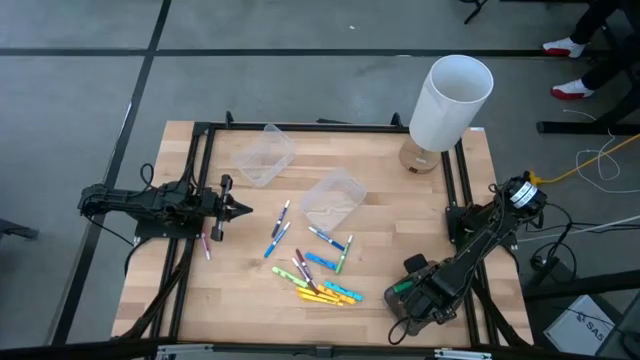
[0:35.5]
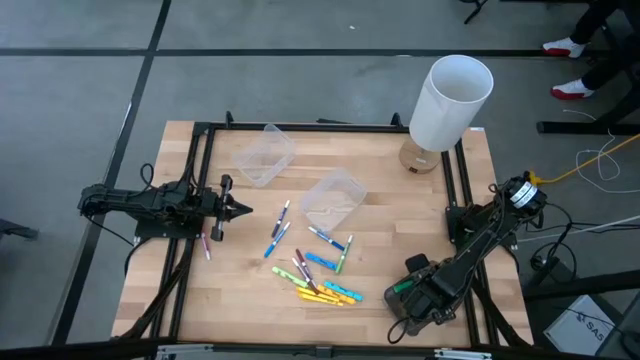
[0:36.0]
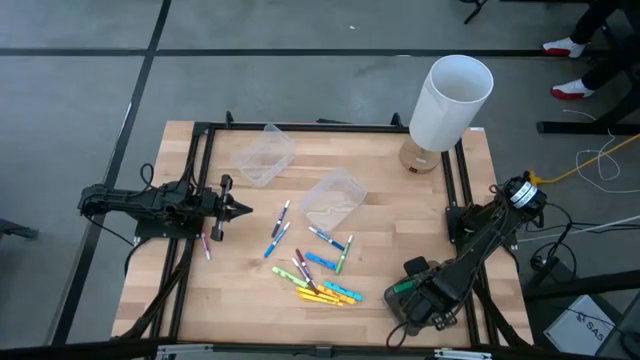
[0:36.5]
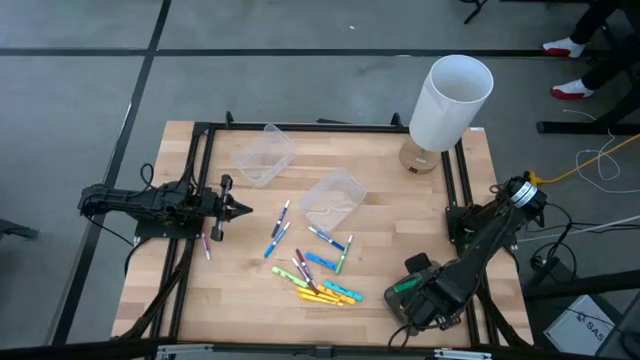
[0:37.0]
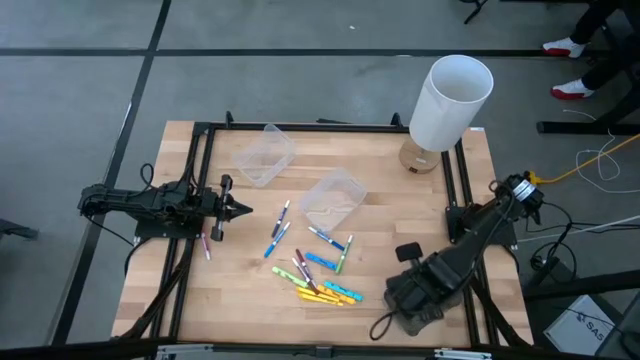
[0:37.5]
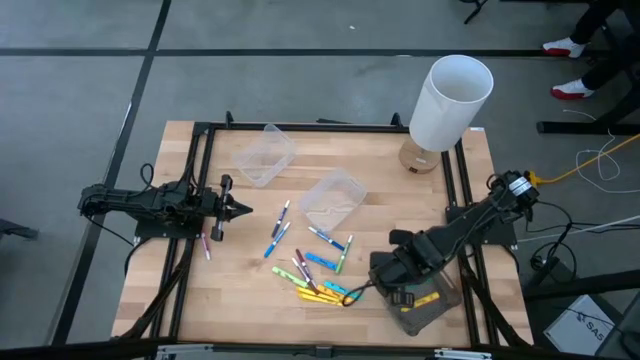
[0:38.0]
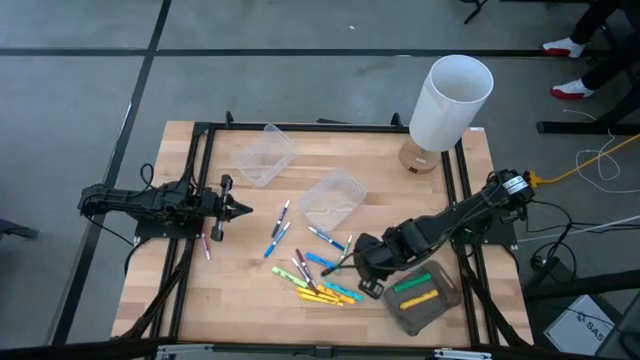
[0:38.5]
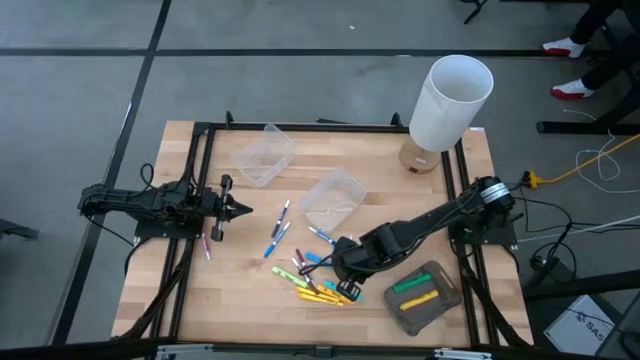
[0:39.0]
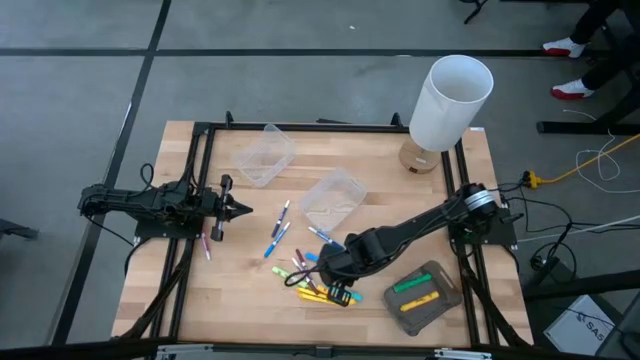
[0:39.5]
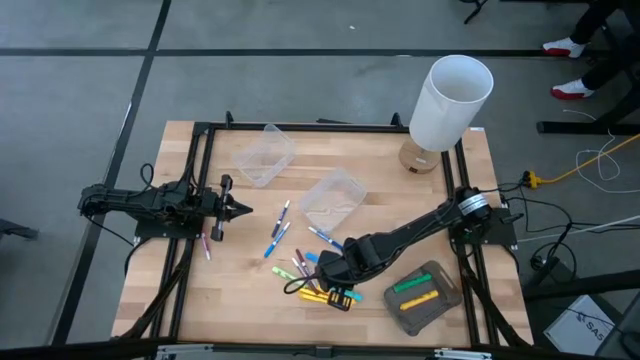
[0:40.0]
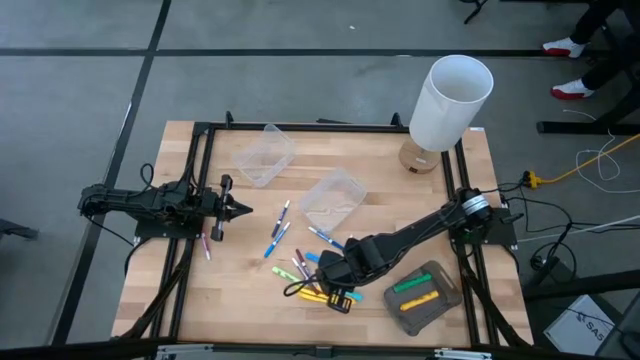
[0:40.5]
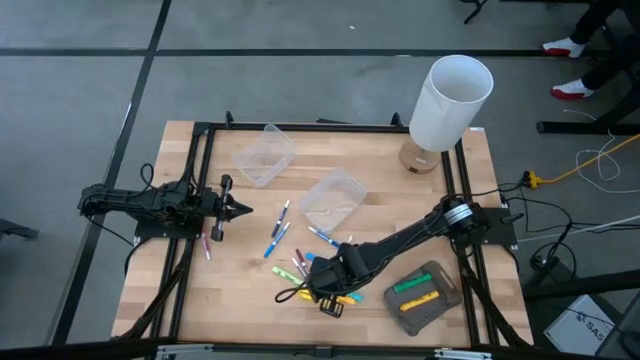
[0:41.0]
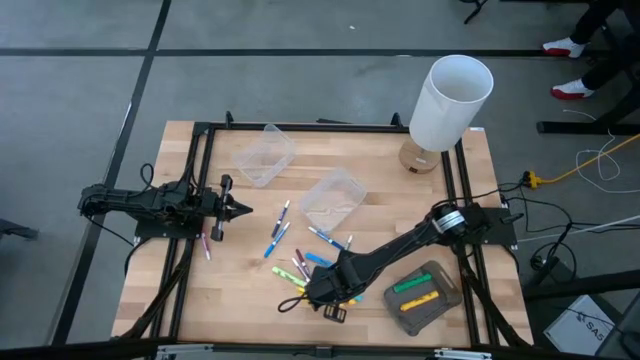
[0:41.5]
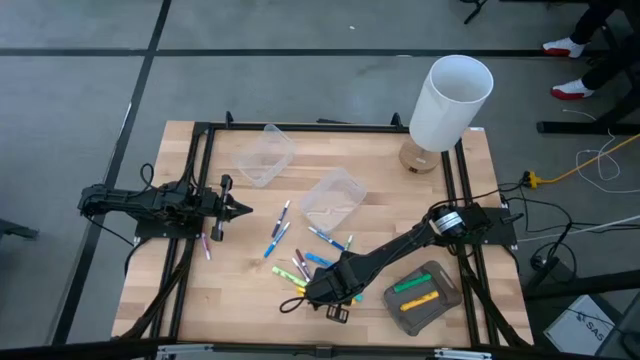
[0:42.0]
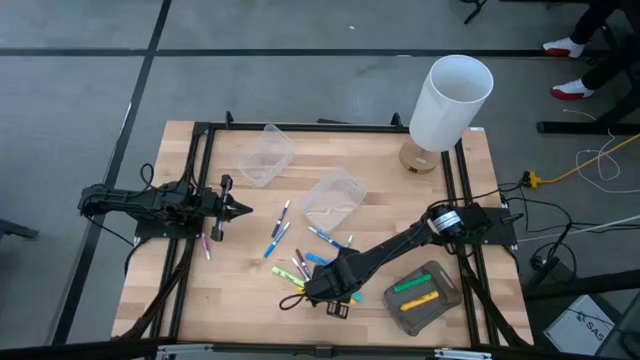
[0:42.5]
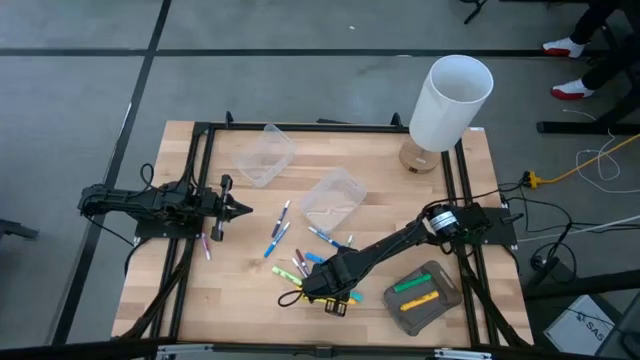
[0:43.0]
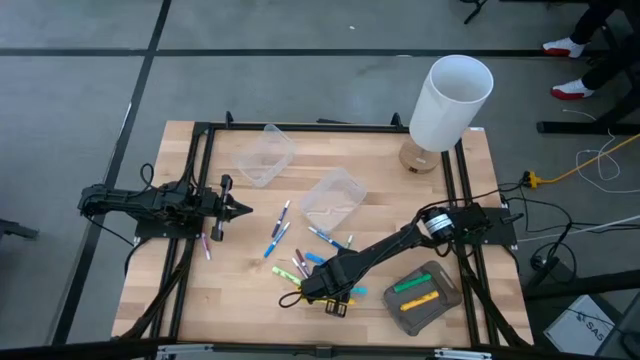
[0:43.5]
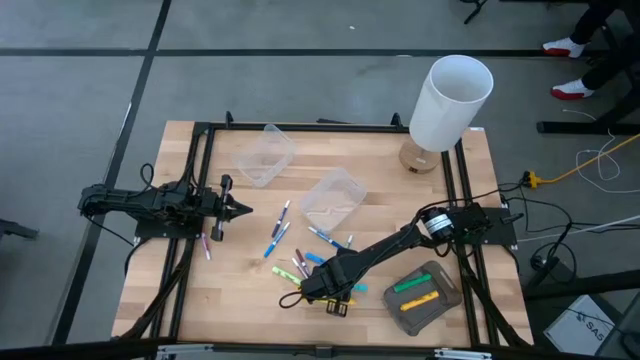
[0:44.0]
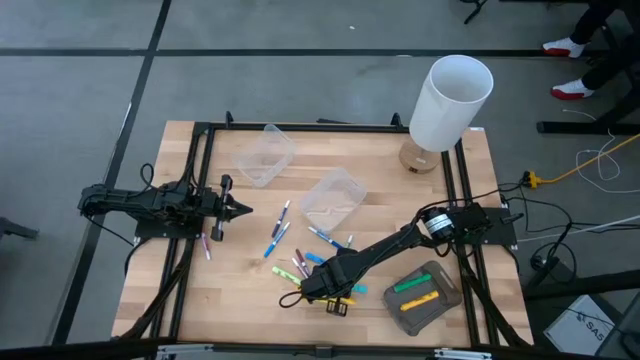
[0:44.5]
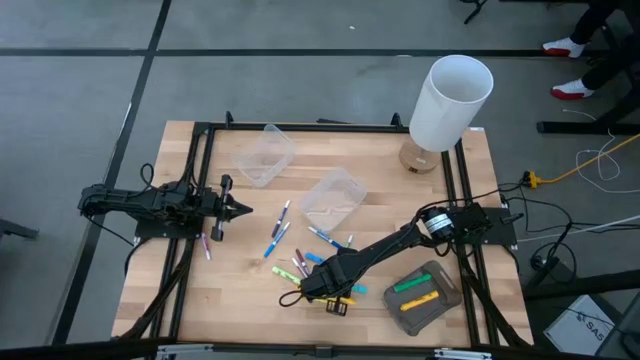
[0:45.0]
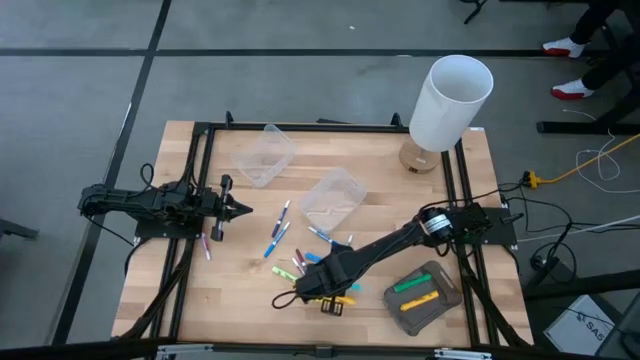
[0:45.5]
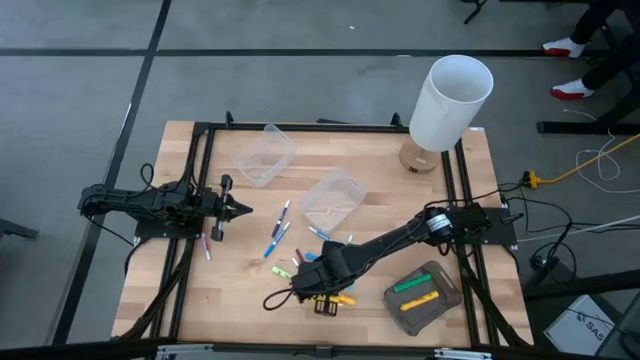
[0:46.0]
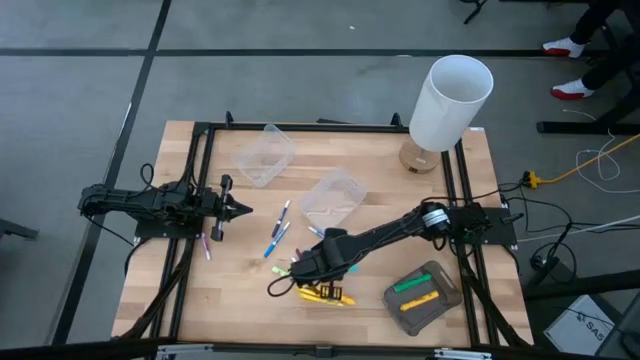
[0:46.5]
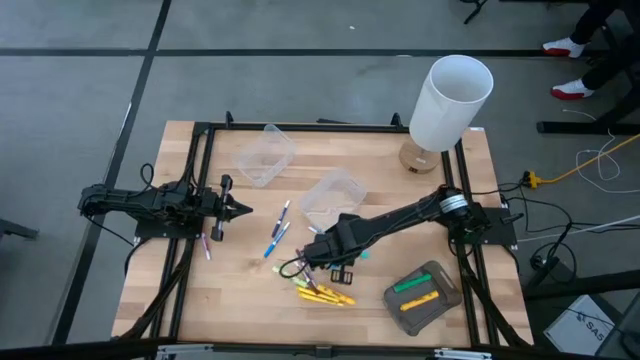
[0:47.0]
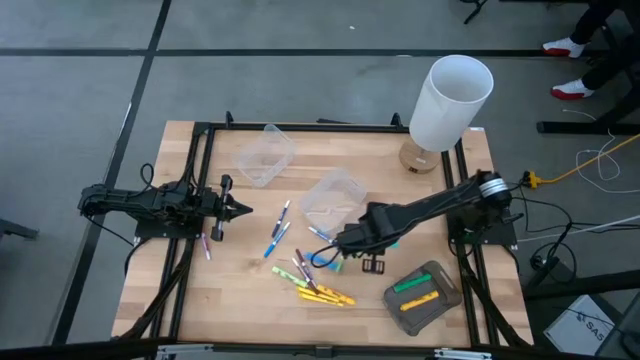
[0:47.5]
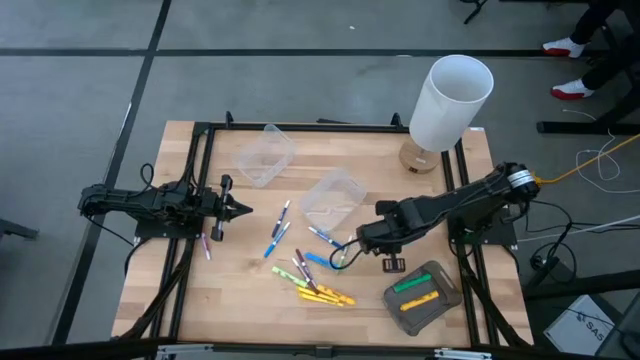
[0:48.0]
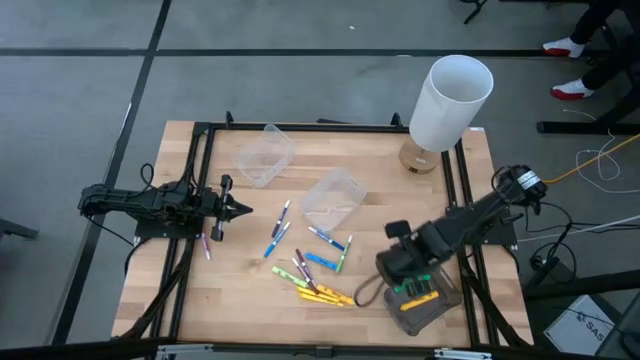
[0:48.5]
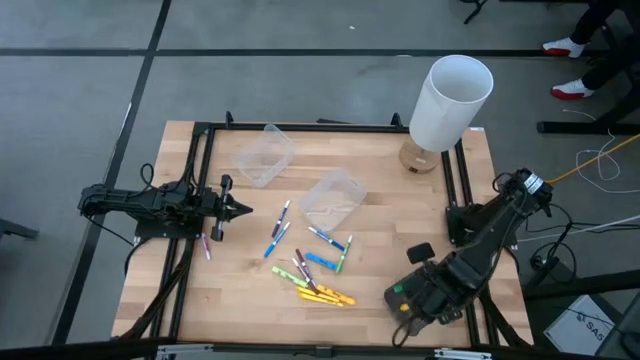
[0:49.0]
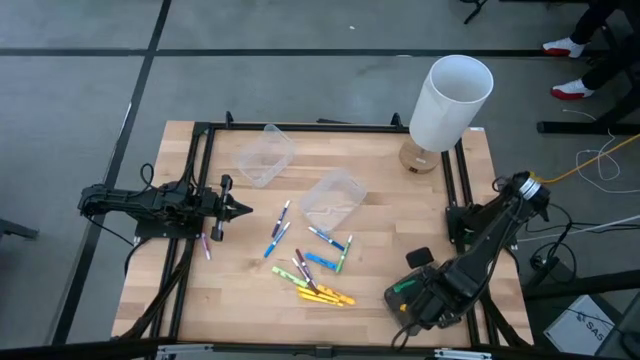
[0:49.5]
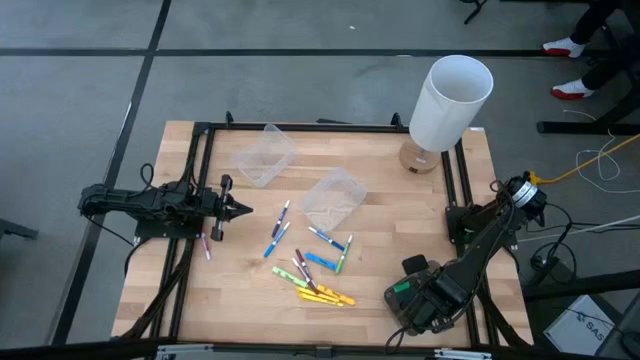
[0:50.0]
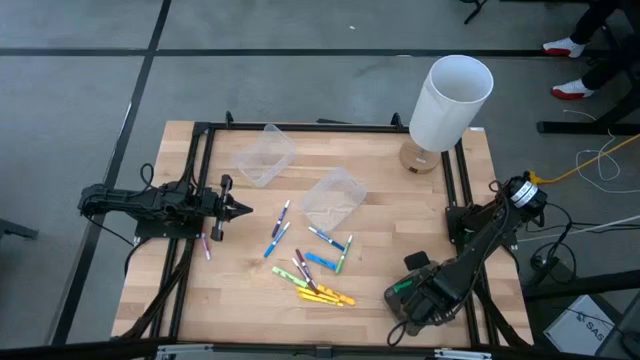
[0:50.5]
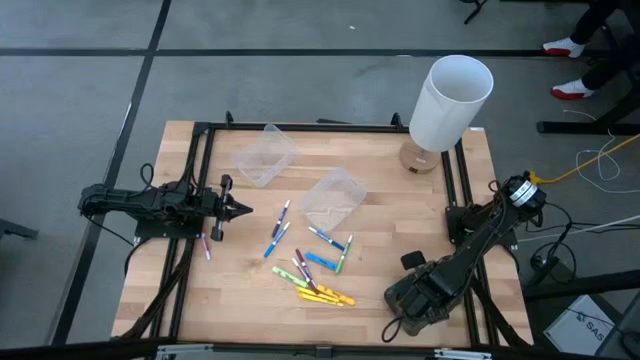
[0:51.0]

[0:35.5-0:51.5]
Task: Pick & Place Markers
Put the light blue highlighter into the black bin

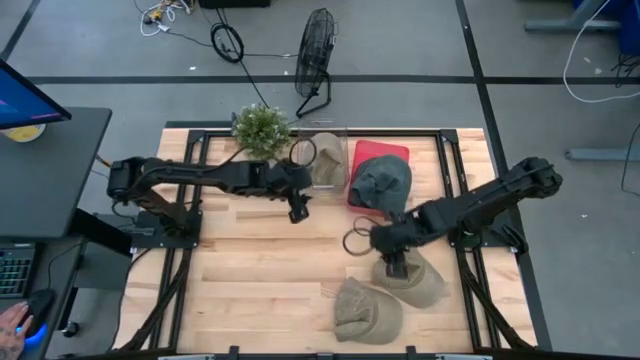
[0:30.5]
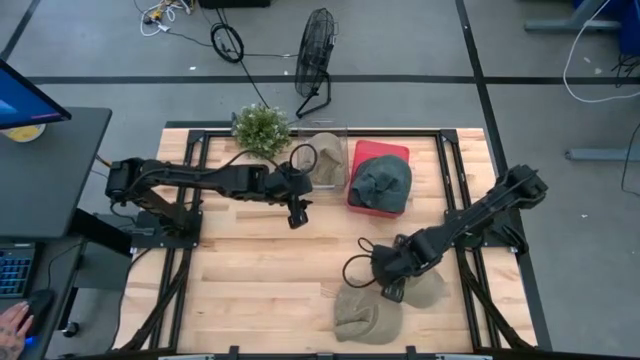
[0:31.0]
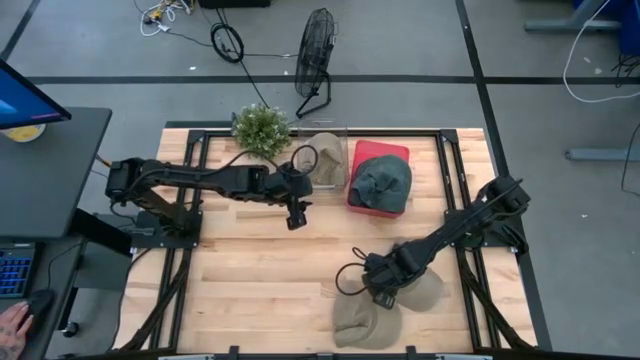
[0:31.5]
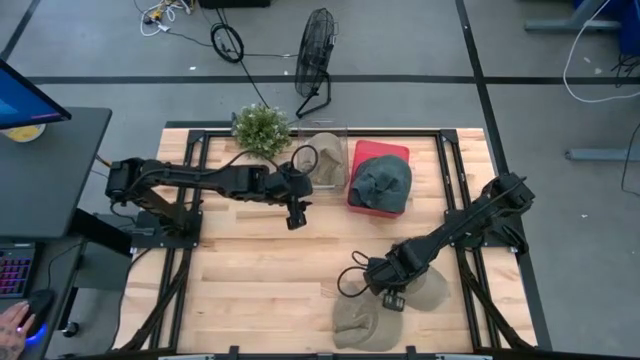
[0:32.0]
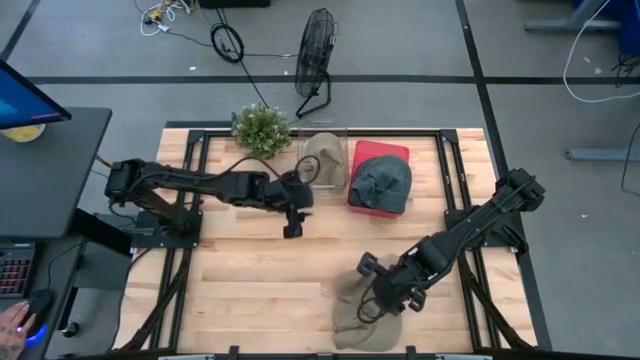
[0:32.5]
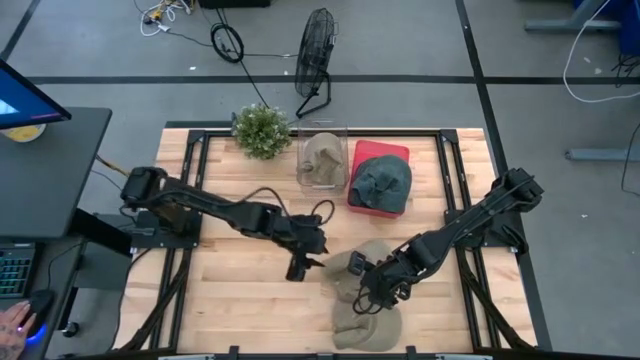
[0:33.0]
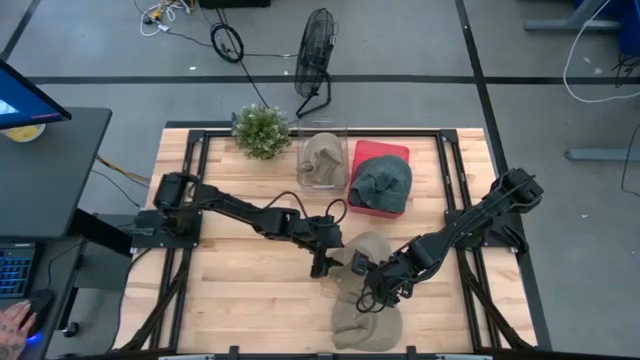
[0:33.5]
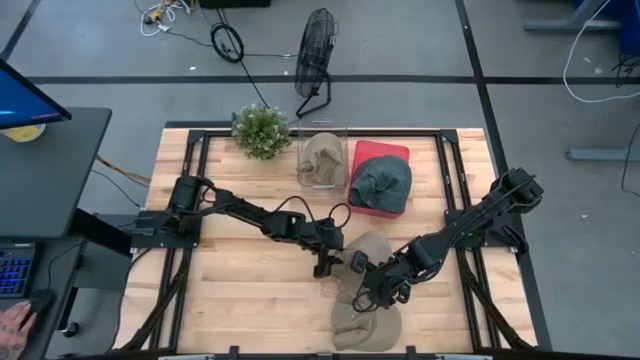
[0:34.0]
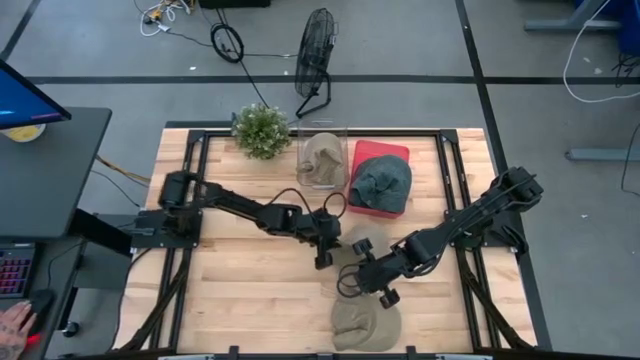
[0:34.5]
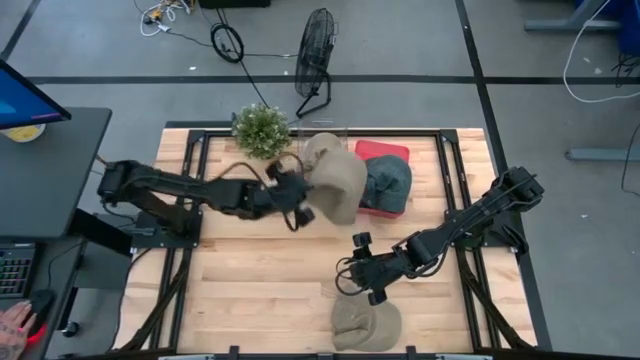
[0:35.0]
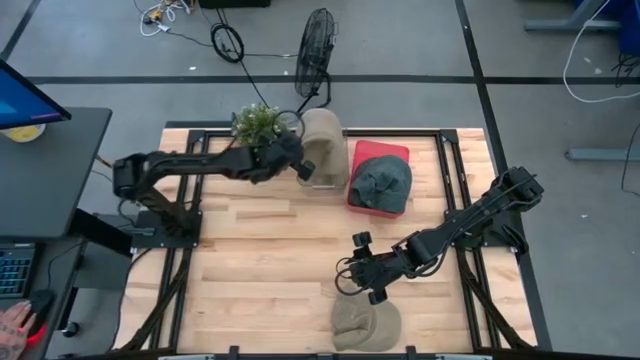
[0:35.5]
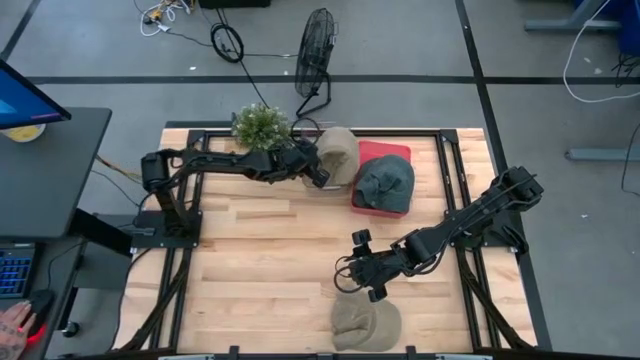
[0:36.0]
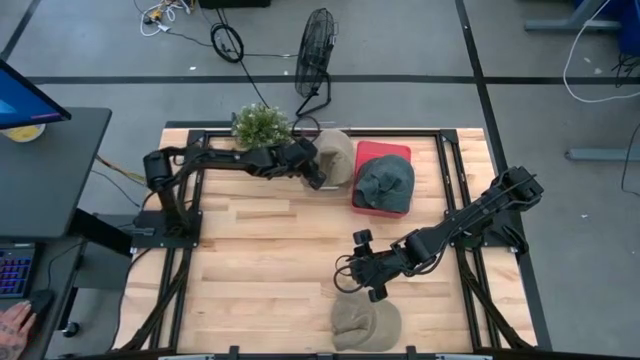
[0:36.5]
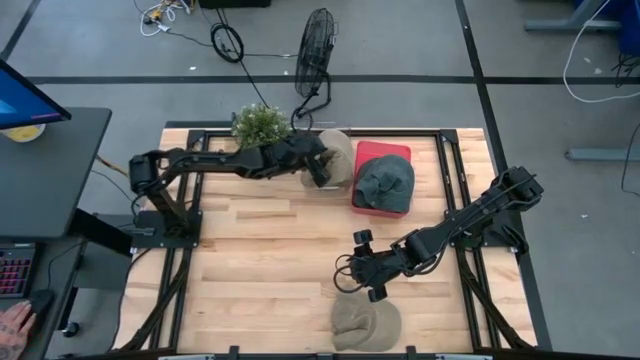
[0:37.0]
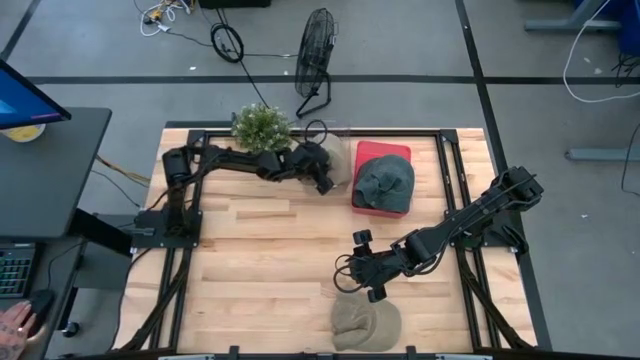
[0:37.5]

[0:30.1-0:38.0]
Task: Pick & Place hat
Put the top brown cap into the transparent bin
